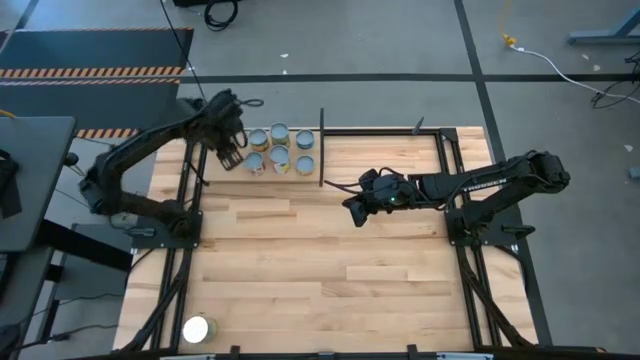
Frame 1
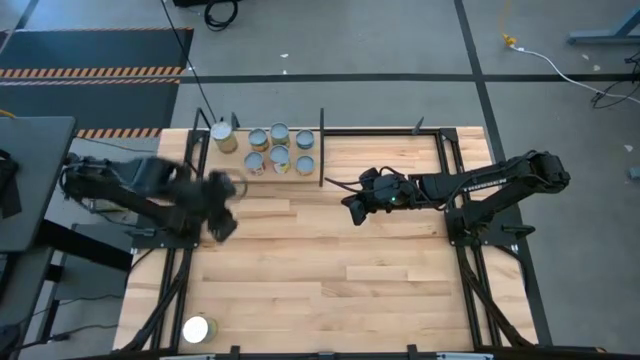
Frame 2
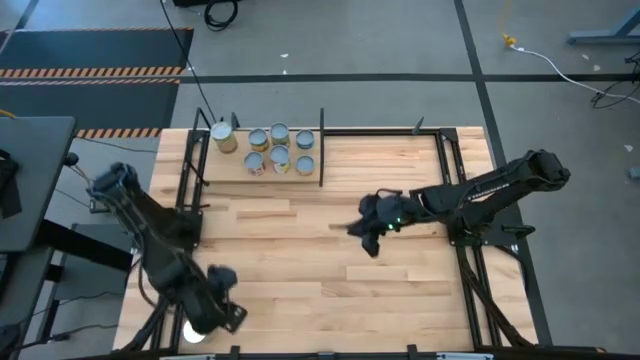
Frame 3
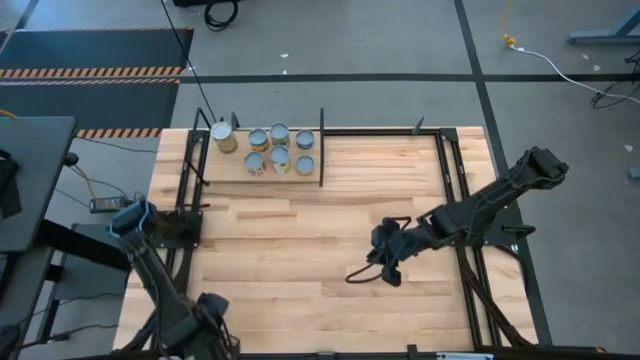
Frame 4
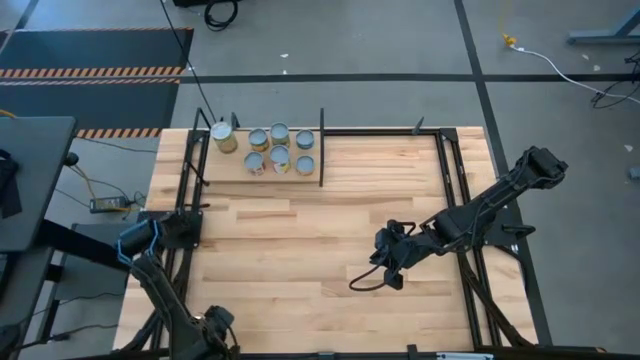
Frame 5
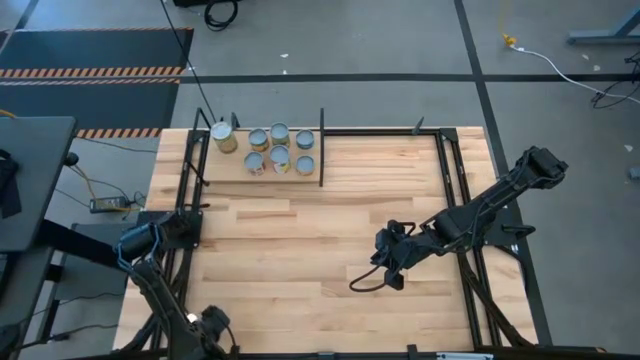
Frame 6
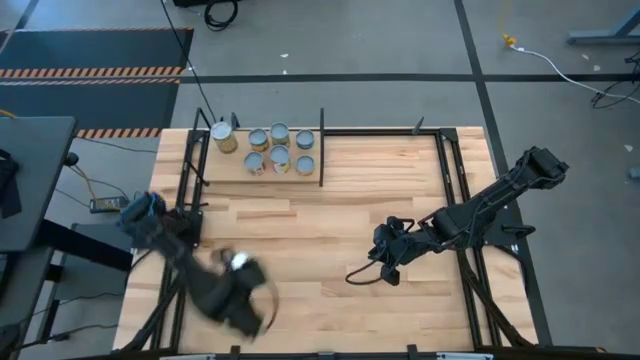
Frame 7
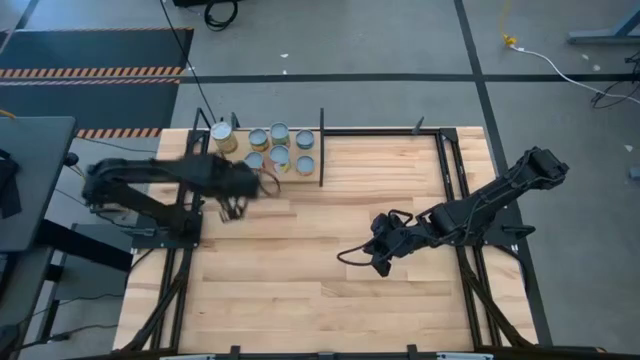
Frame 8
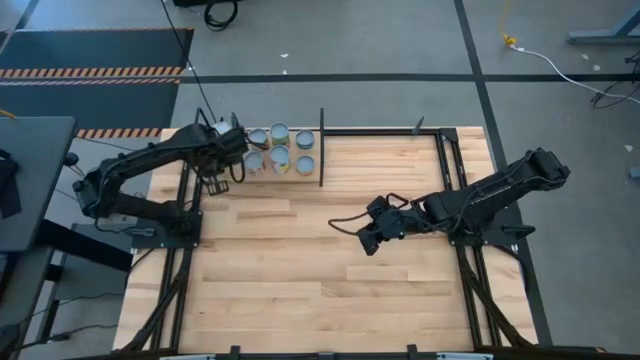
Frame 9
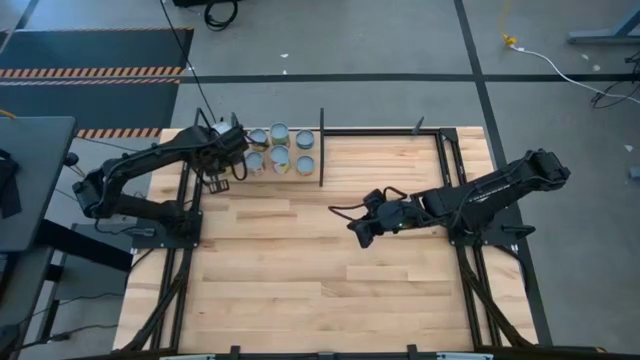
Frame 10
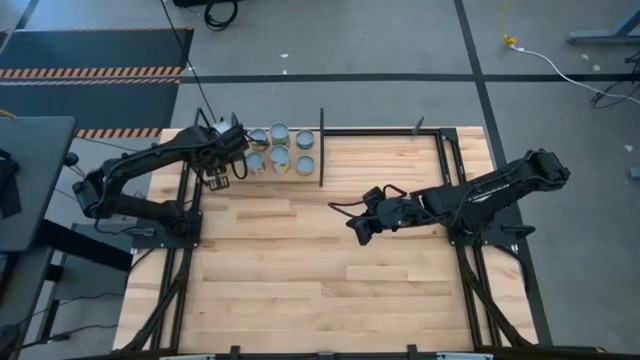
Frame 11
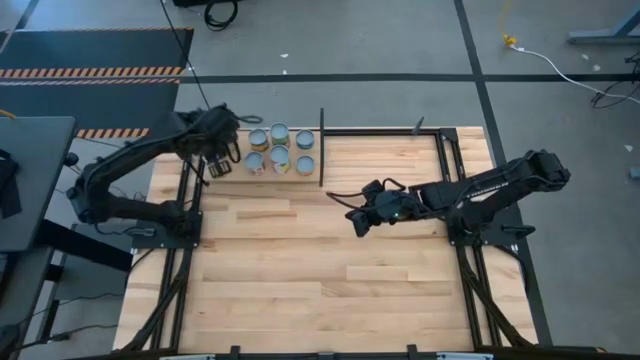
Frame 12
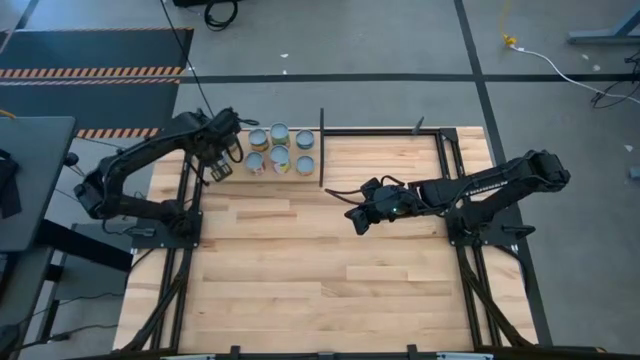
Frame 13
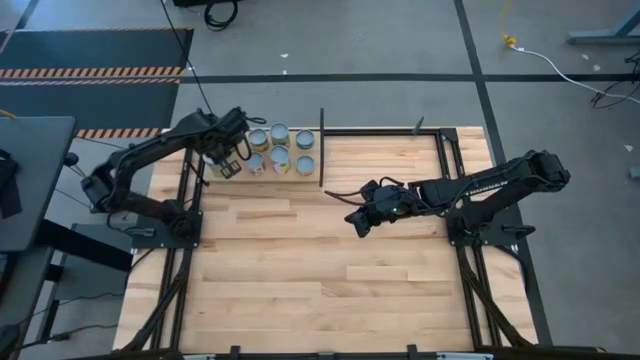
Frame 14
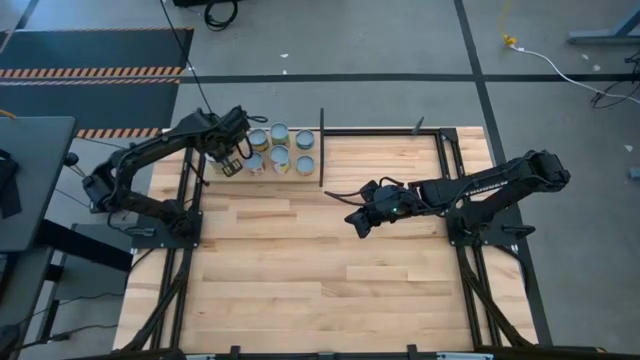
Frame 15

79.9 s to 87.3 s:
Task: Pick and place cans onto a shelf
Put the canned carrots on the shelf aligned with the canned oranges

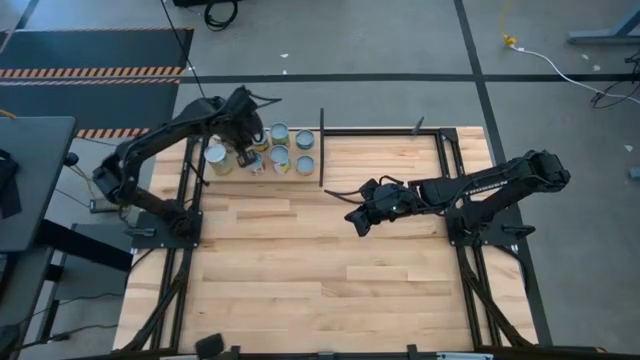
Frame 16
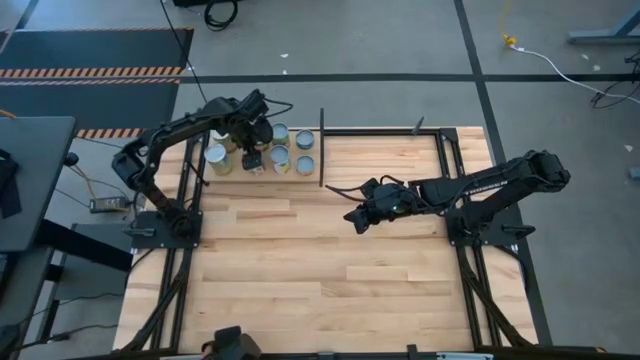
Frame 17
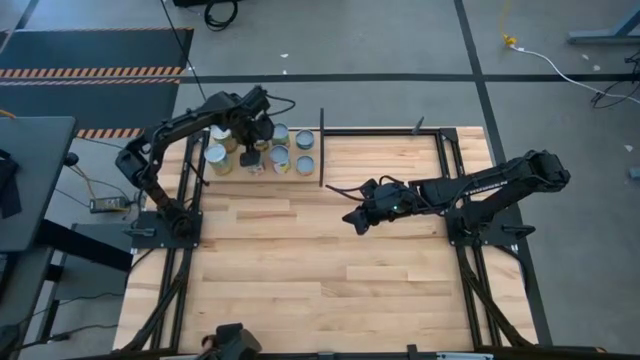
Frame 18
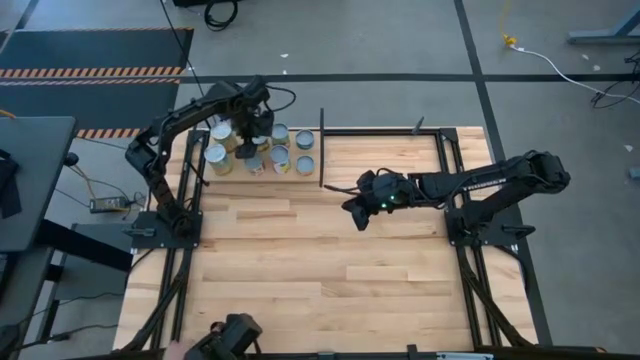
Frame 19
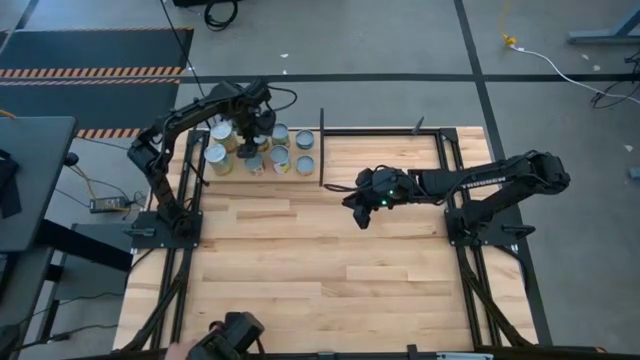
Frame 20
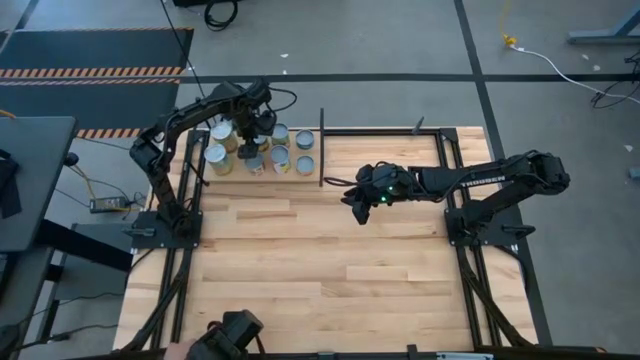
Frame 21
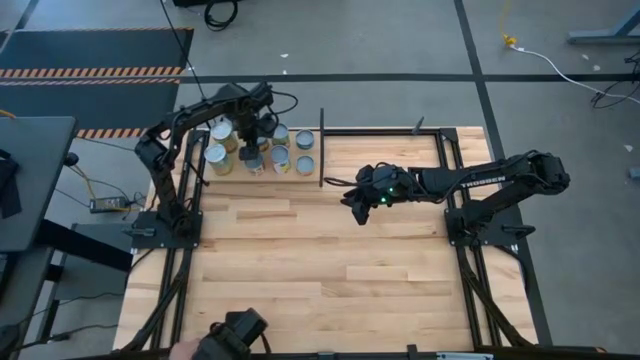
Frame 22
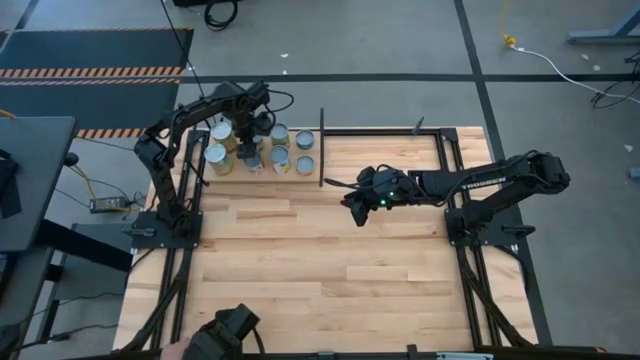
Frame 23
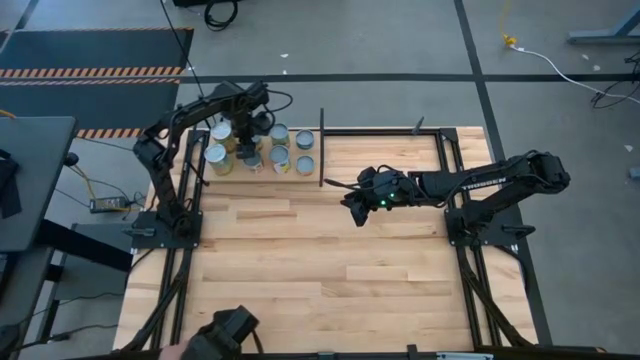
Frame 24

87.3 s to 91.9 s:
Adjust the canned goods on the shelf

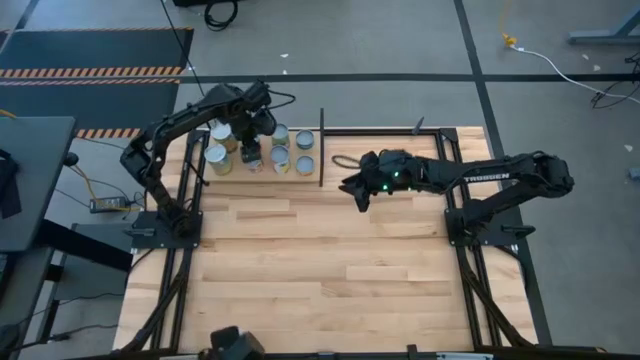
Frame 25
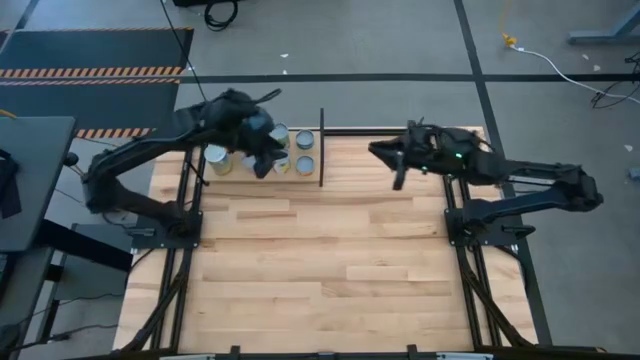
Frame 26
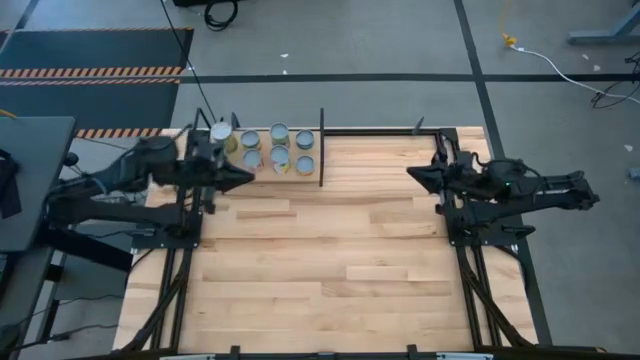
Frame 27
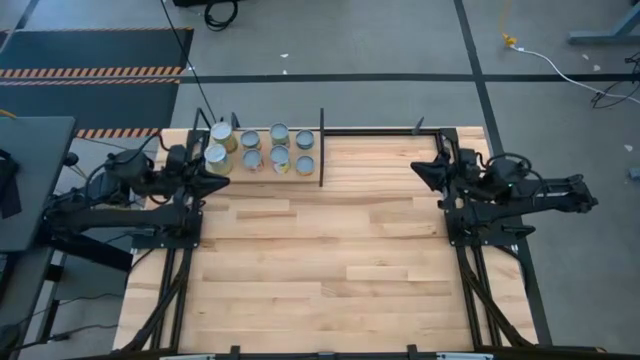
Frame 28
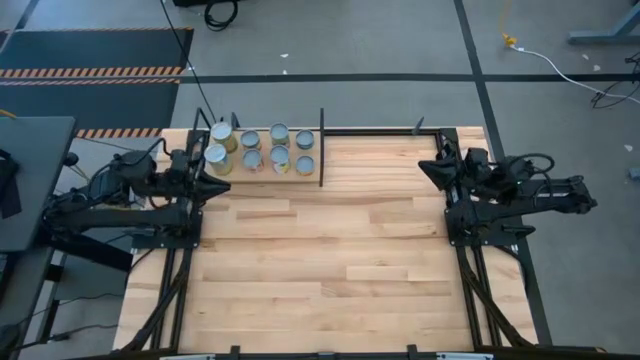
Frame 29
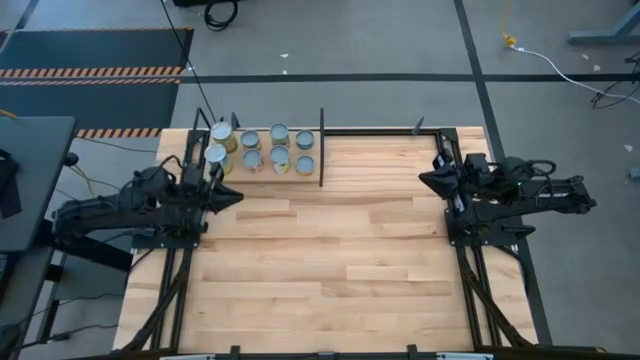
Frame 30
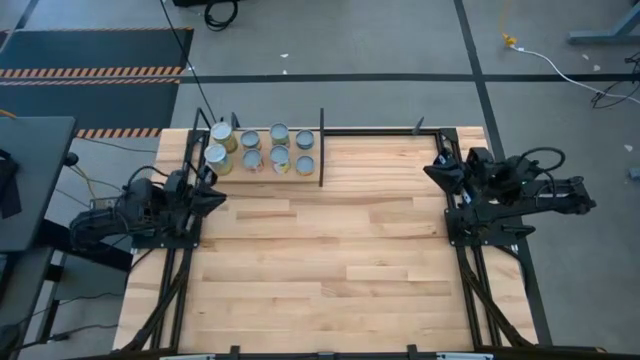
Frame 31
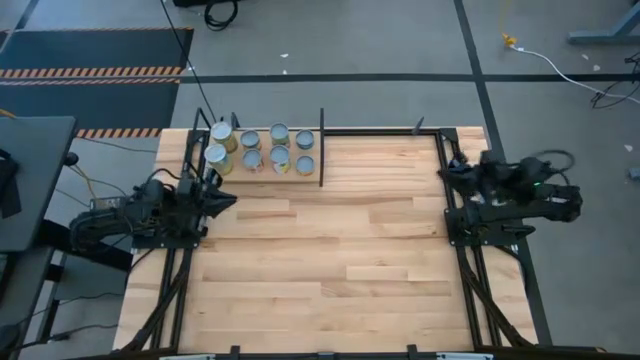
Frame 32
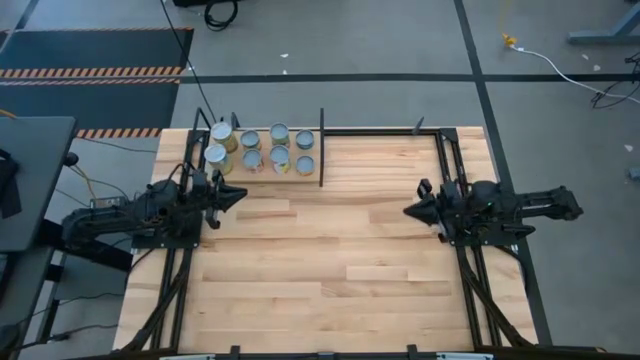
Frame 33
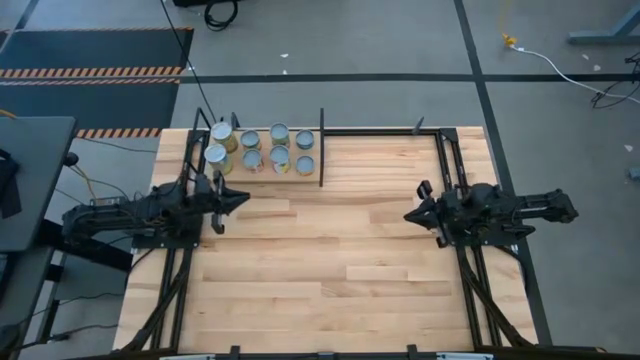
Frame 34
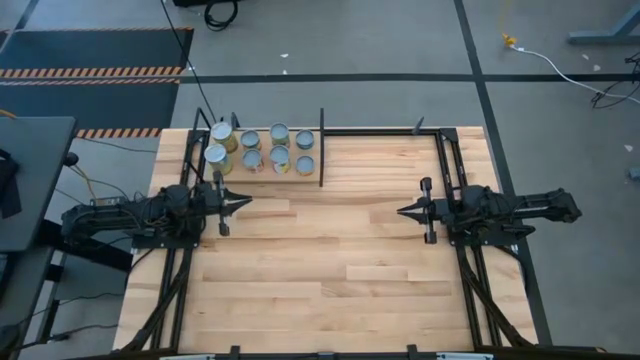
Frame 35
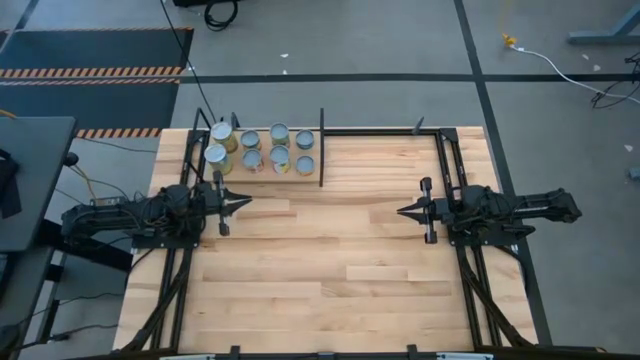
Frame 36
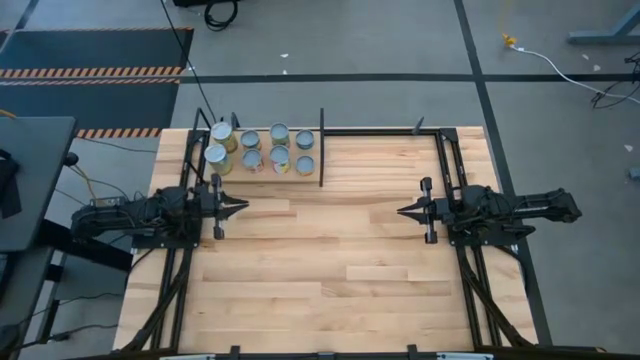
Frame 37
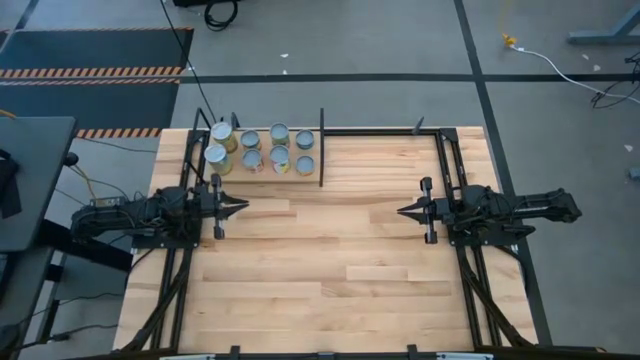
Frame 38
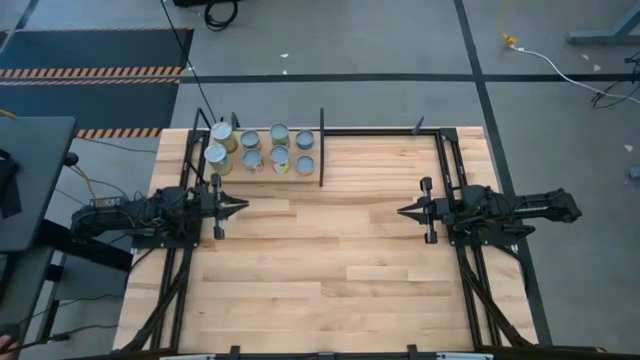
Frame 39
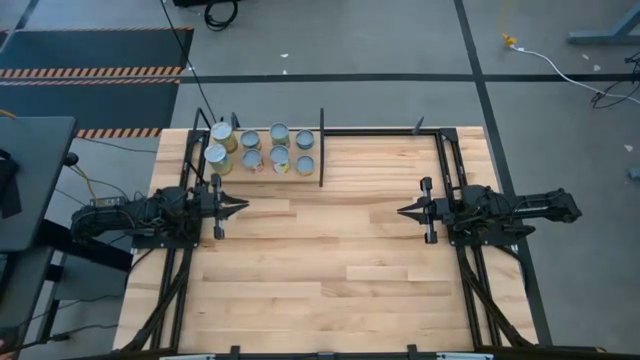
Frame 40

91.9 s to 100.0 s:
Return to Home Position

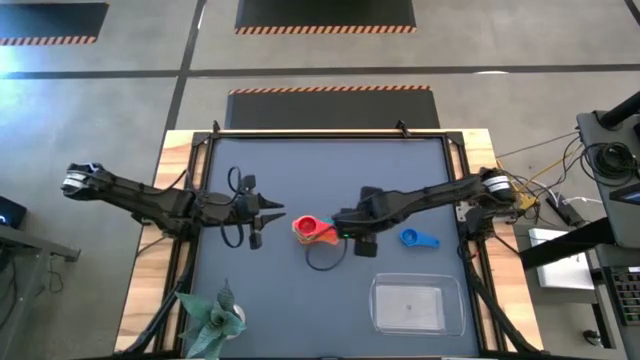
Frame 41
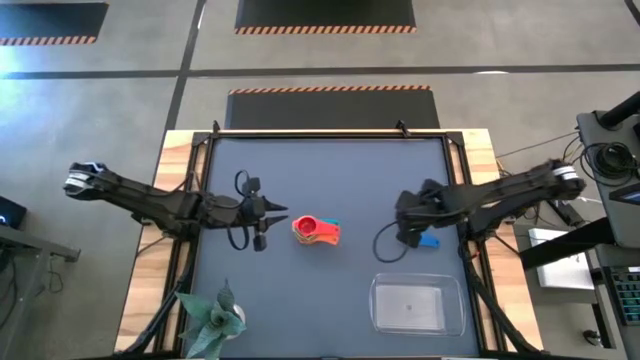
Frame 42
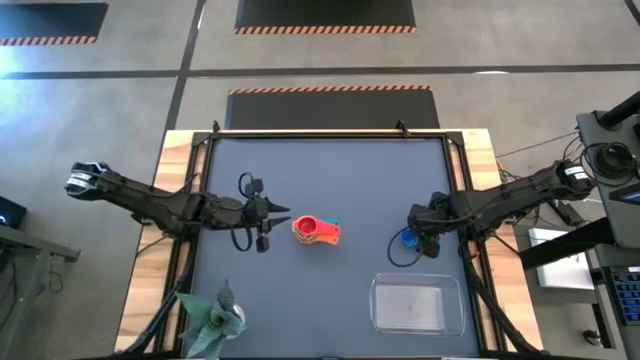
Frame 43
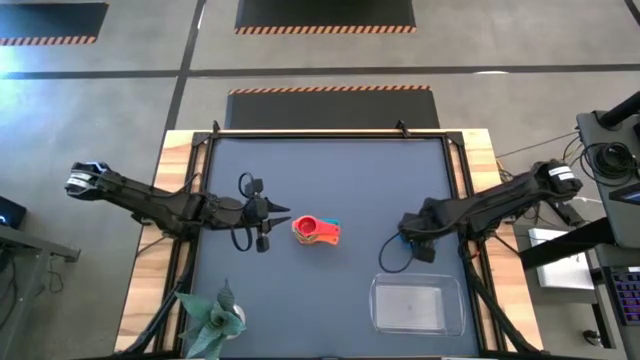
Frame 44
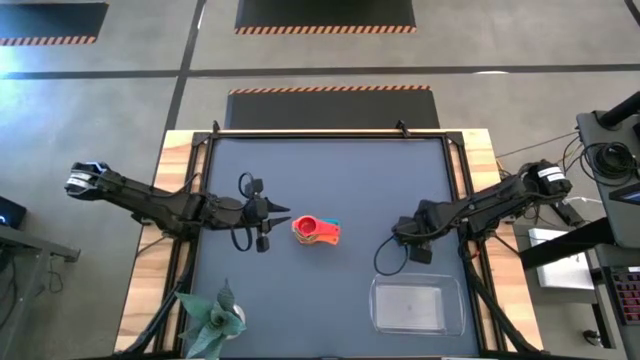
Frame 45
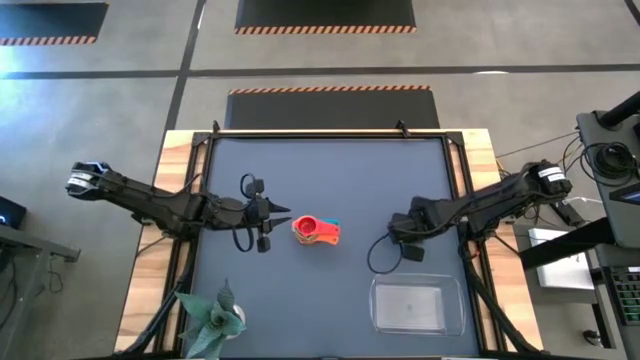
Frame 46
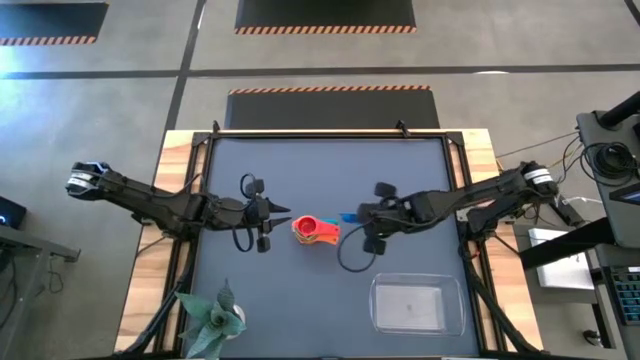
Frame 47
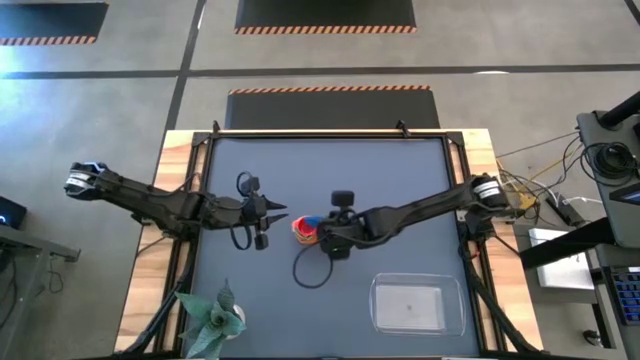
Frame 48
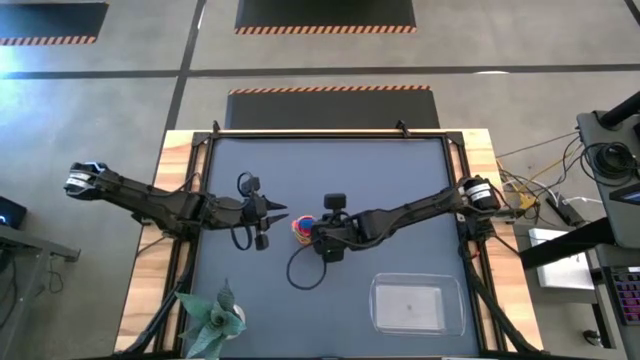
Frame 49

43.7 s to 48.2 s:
Task: Nest measuring cups in basket
Stack the blue measuring cup on top of the red measuring cup
